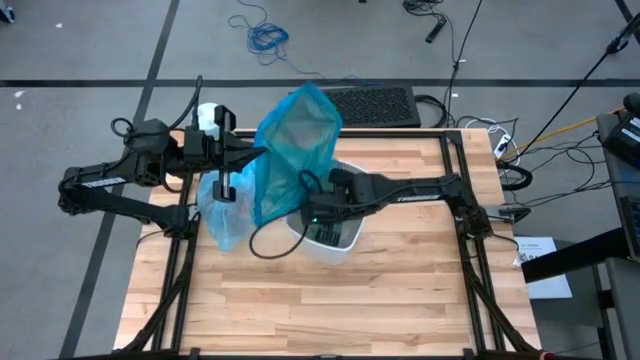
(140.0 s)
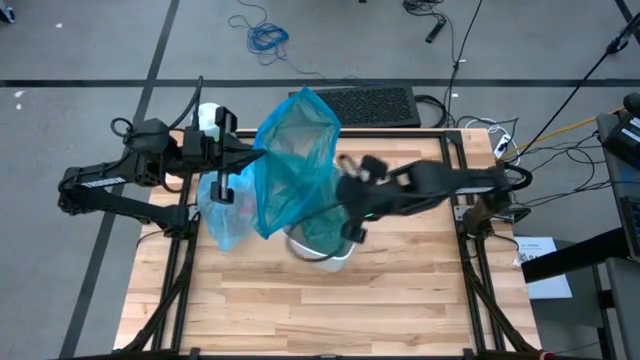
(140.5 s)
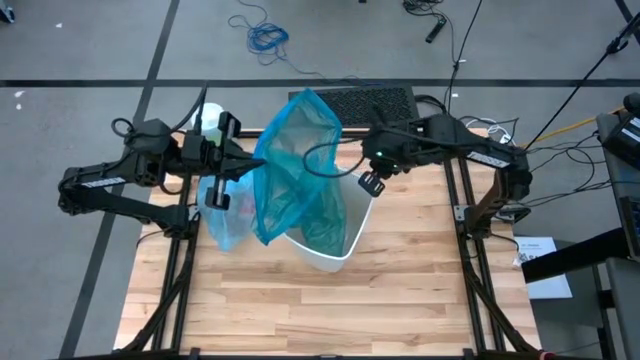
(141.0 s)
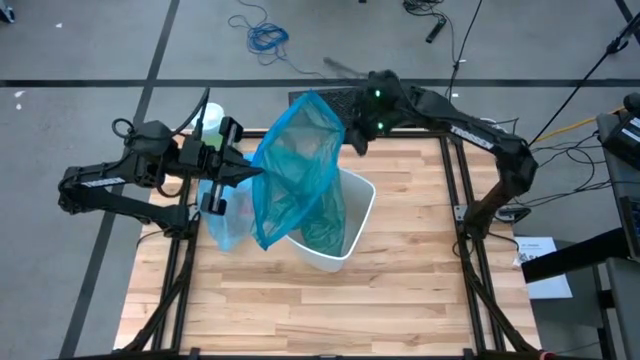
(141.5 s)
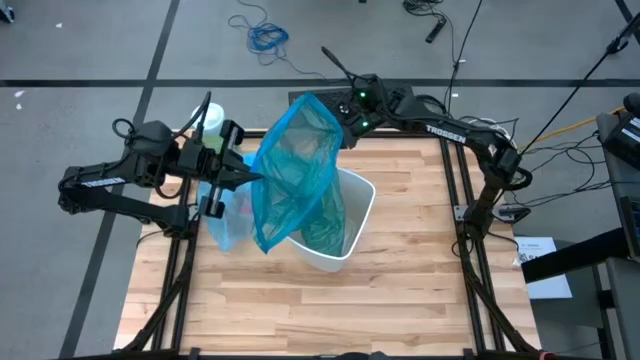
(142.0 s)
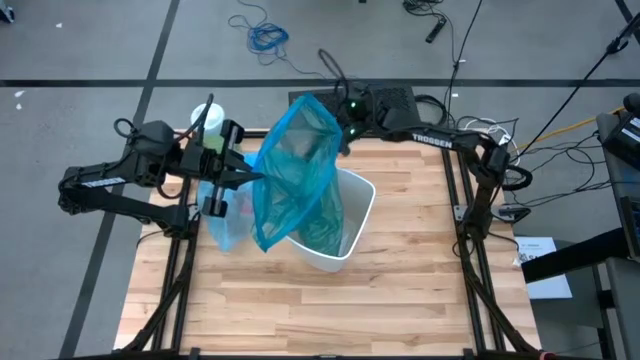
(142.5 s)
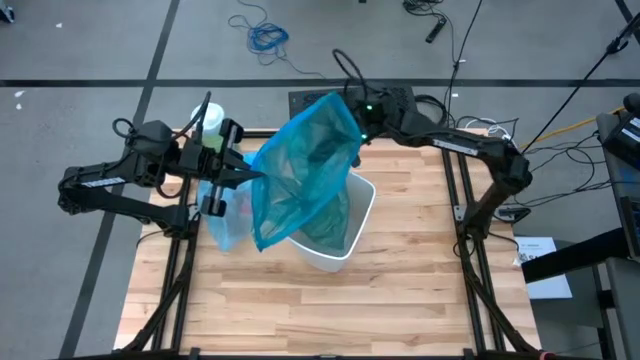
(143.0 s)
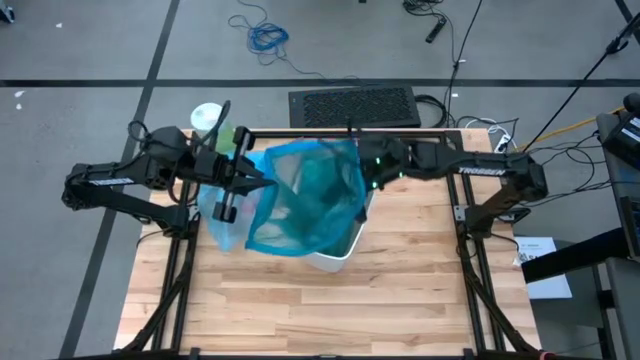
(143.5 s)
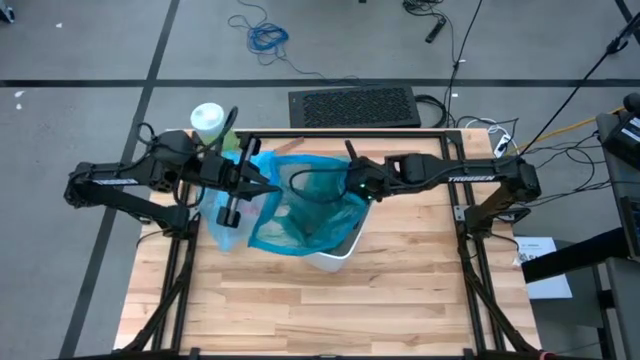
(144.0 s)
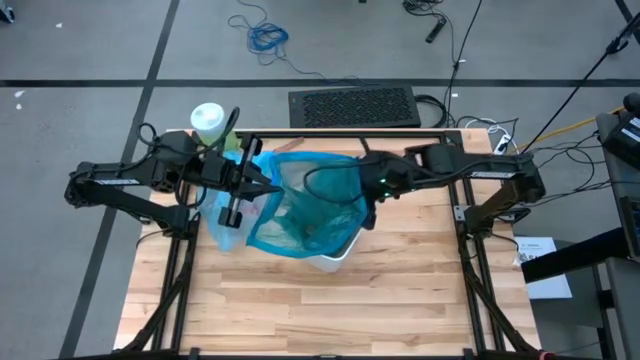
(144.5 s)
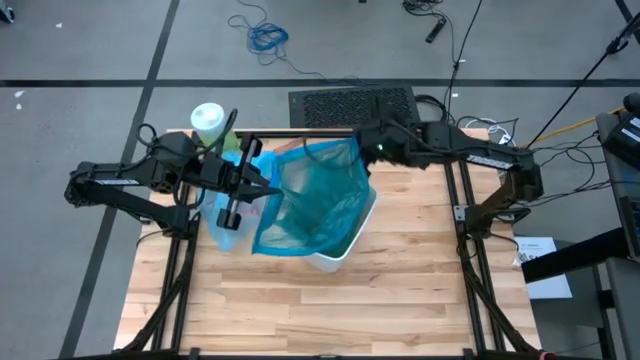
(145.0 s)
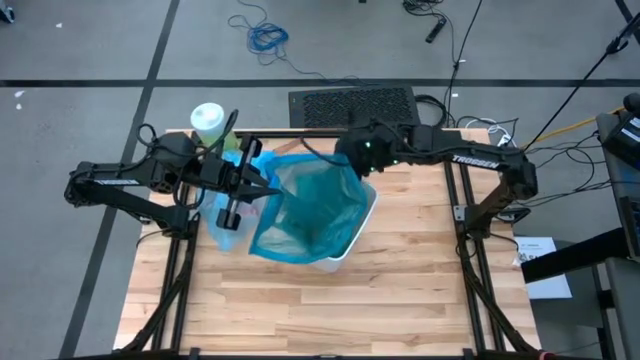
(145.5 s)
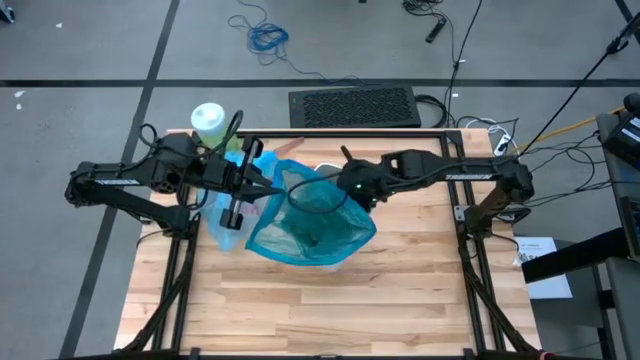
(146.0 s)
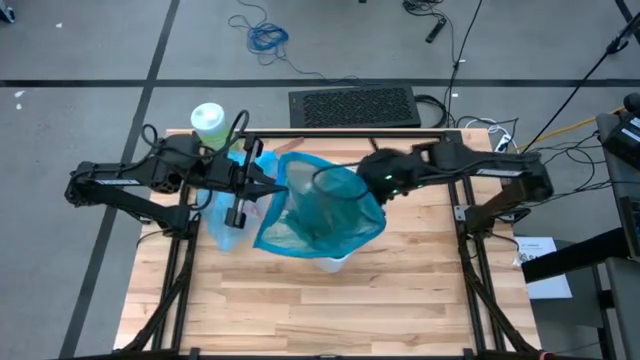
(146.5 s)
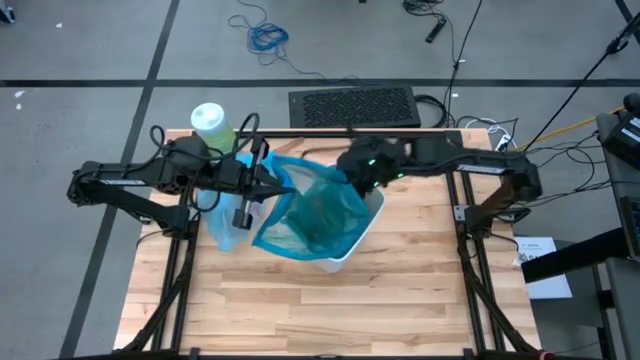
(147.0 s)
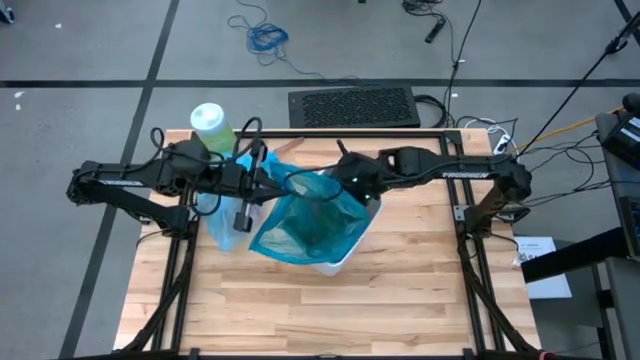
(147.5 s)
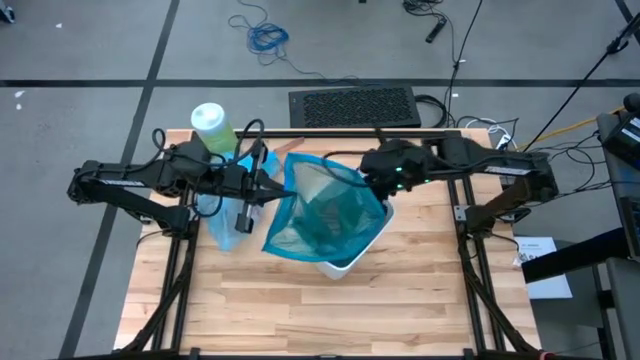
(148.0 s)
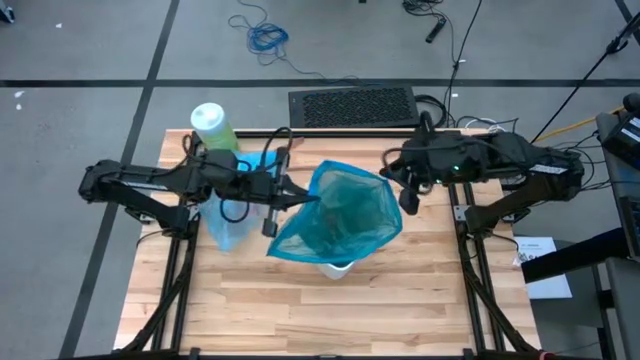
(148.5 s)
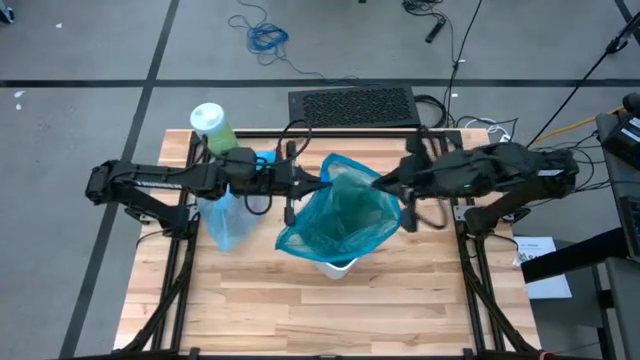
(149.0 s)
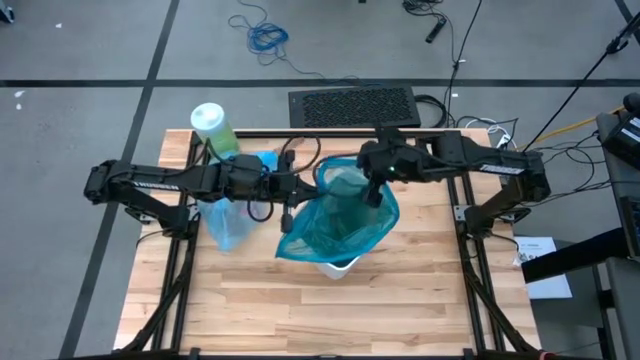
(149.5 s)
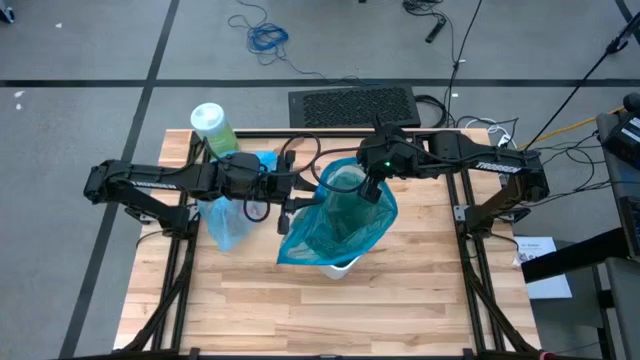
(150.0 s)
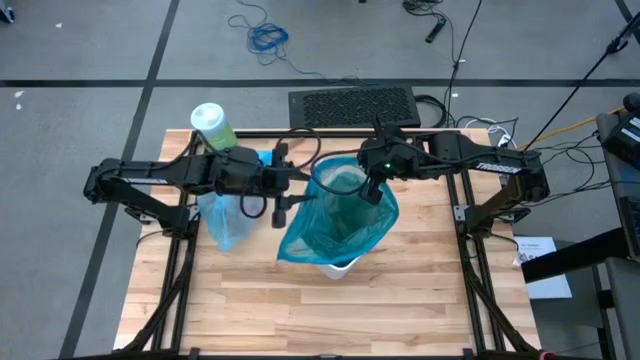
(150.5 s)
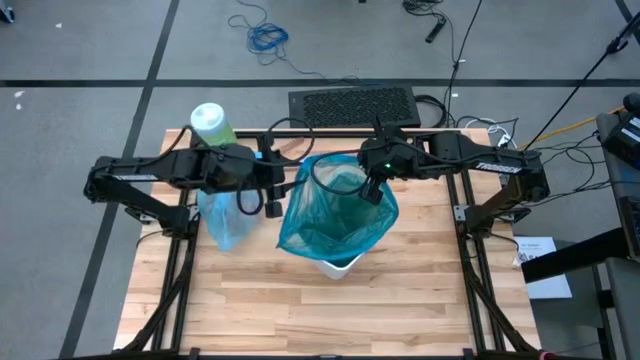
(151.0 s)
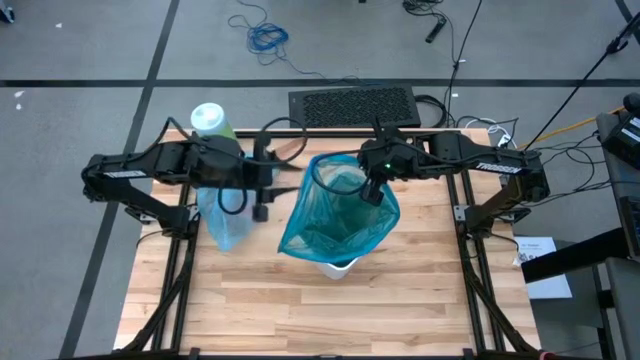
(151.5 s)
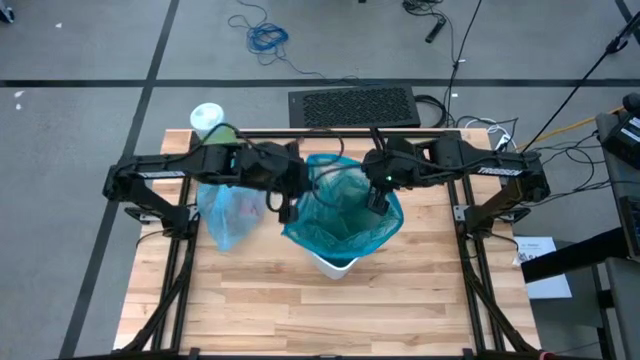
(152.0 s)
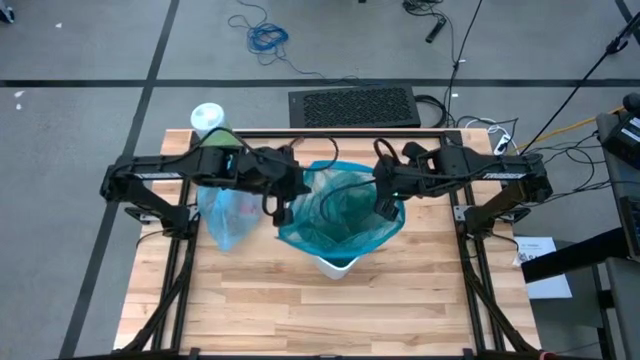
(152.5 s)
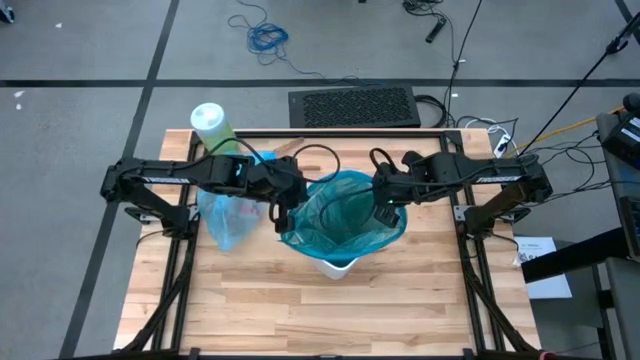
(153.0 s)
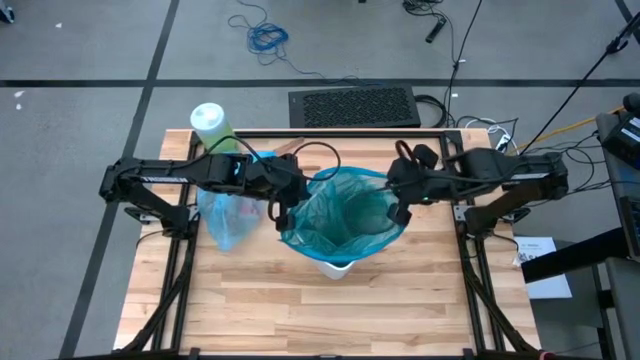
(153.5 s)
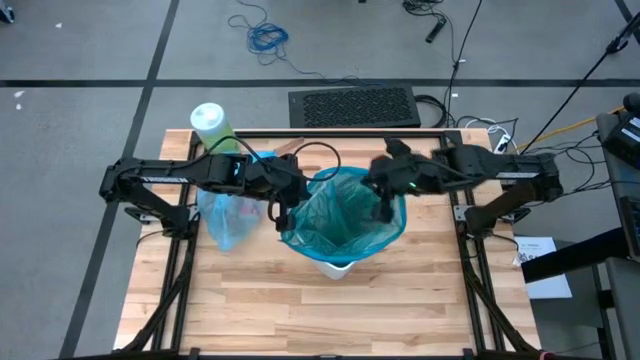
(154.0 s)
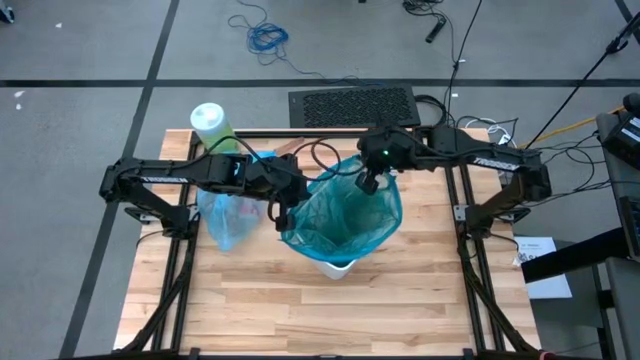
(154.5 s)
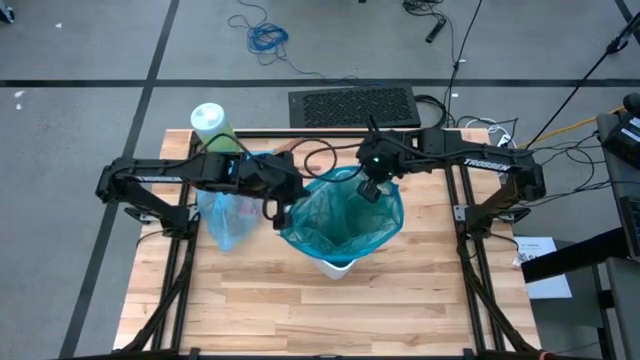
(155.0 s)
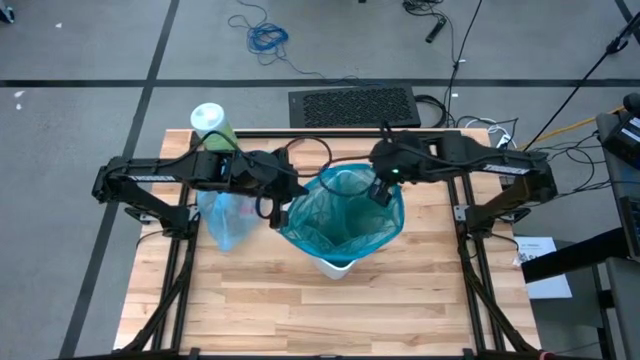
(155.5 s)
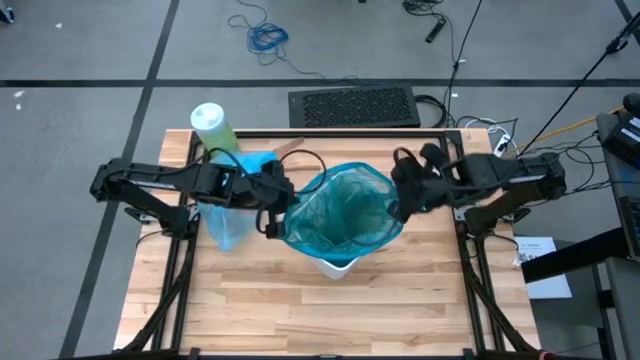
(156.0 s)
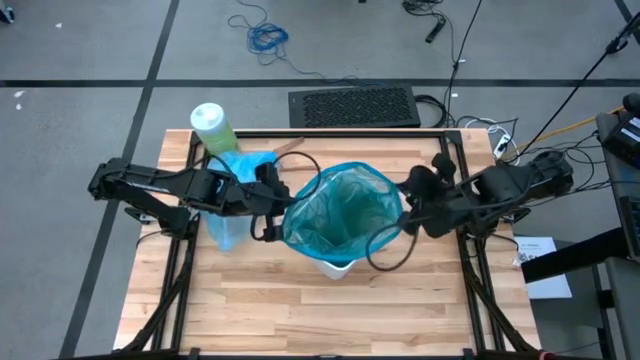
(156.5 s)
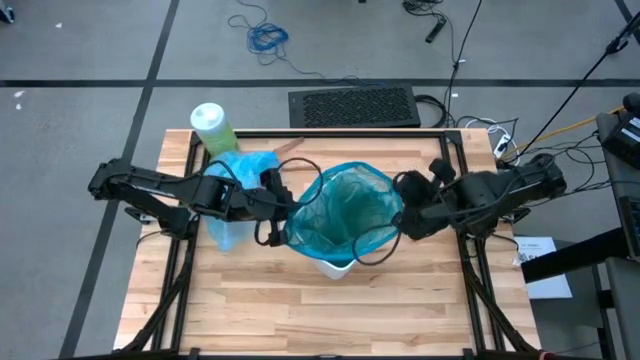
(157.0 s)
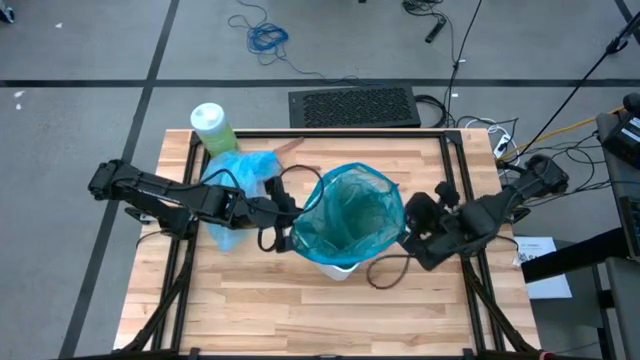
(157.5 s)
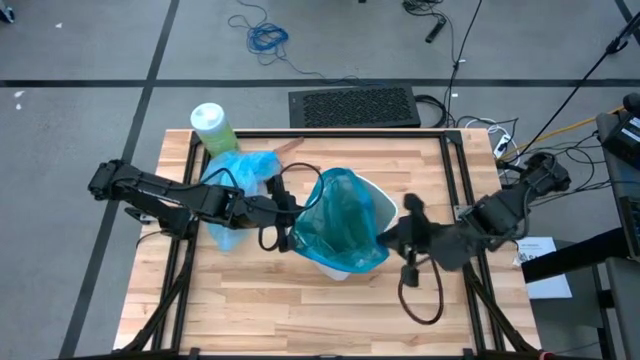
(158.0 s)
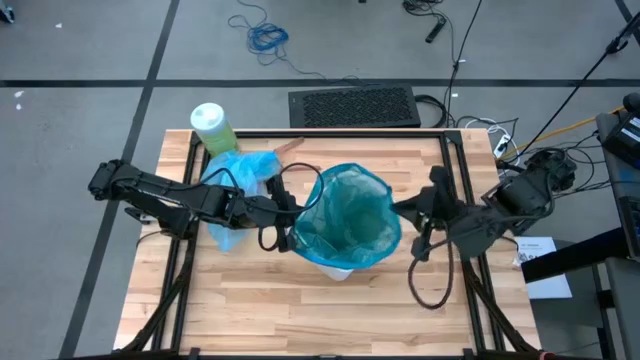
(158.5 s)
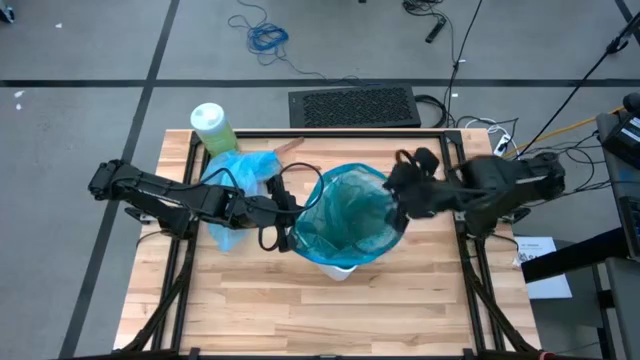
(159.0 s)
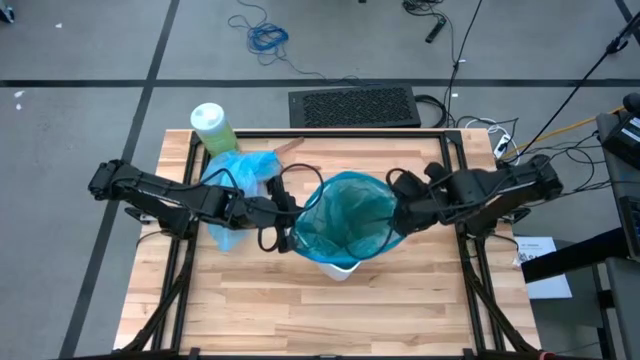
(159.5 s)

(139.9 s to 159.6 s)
Task: place trash/remove bag and relplace
Insert the plastic bag in the white trash bin

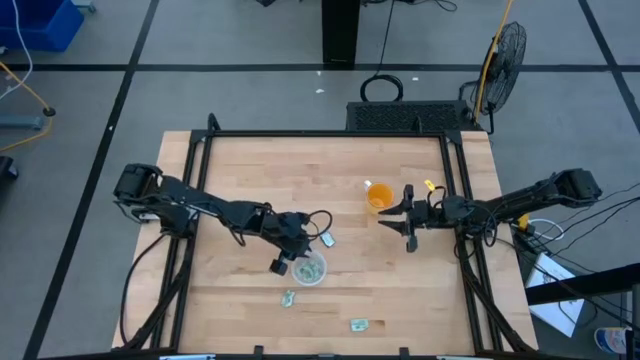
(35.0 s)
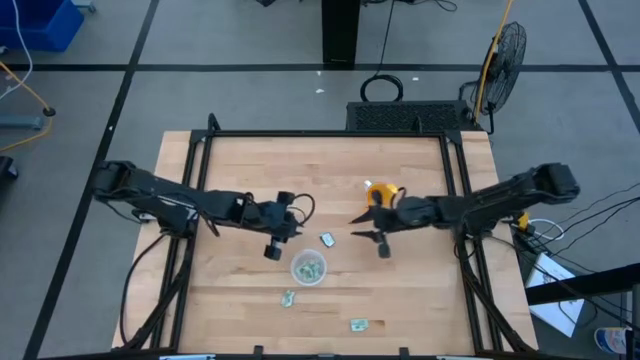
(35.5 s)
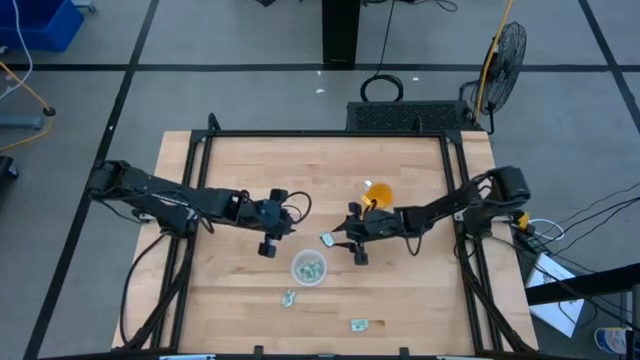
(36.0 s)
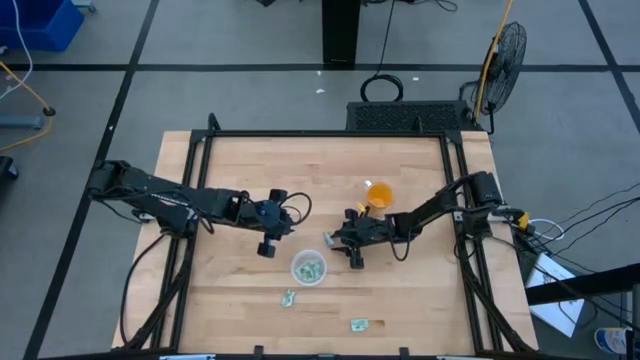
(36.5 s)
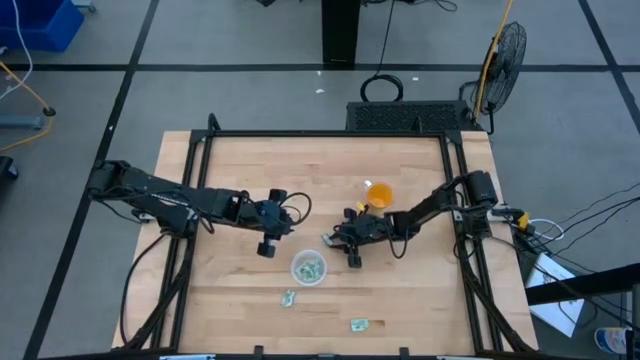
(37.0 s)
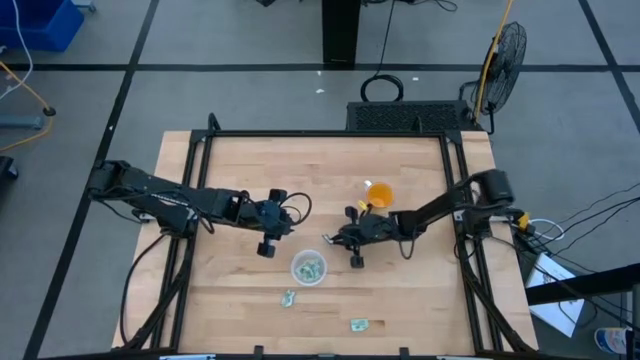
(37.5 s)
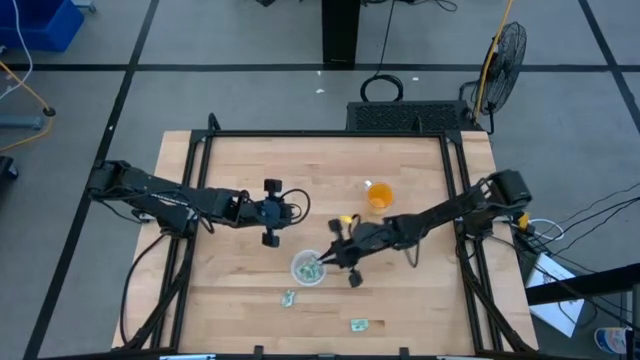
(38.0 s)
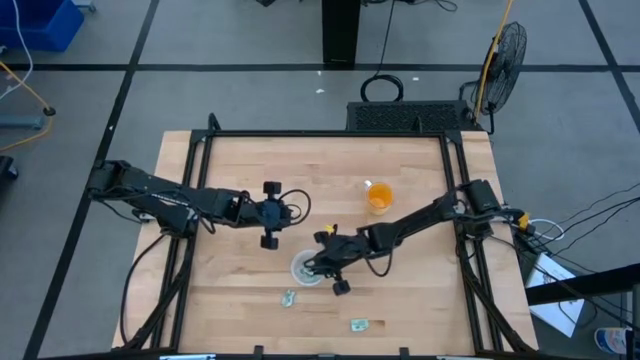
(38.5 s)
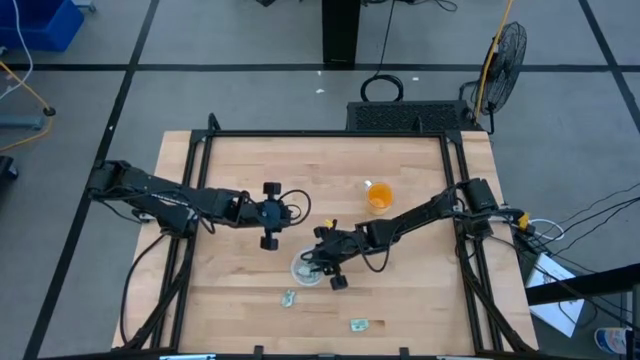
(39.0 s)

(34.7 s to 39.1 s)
Task: Pick and place items into bin
Put the green stevia packet into the transparent bin
